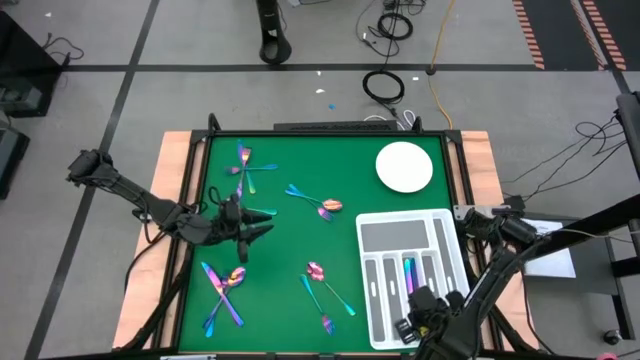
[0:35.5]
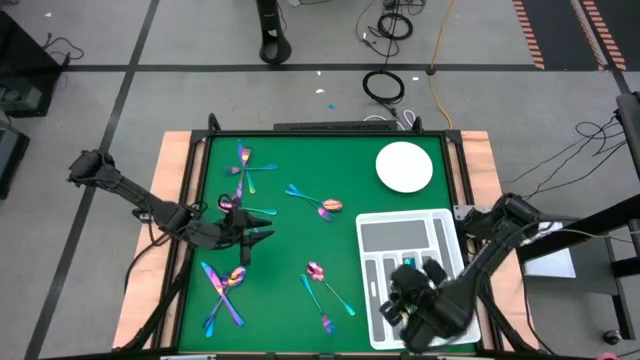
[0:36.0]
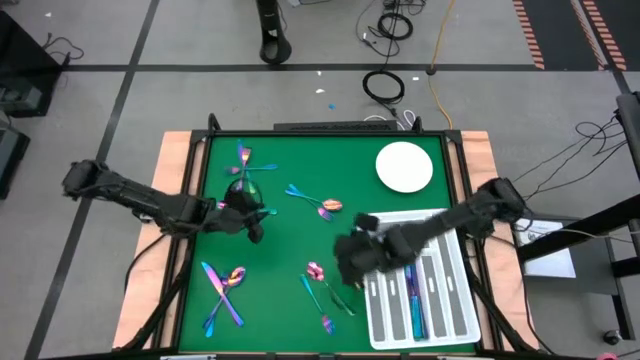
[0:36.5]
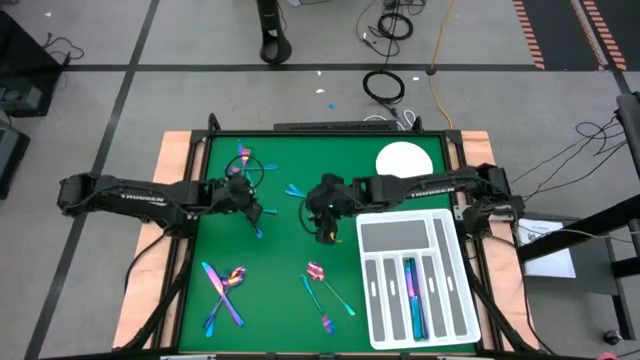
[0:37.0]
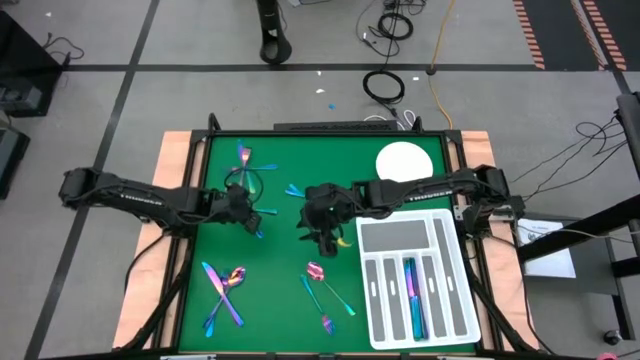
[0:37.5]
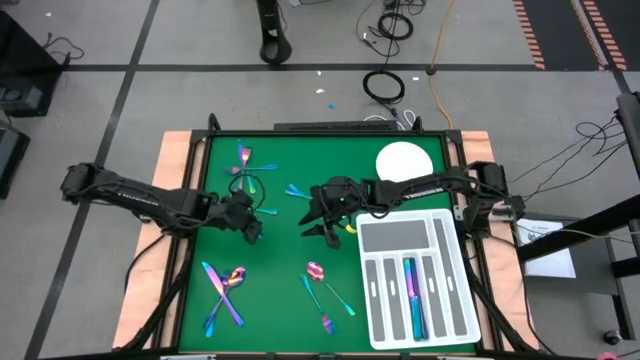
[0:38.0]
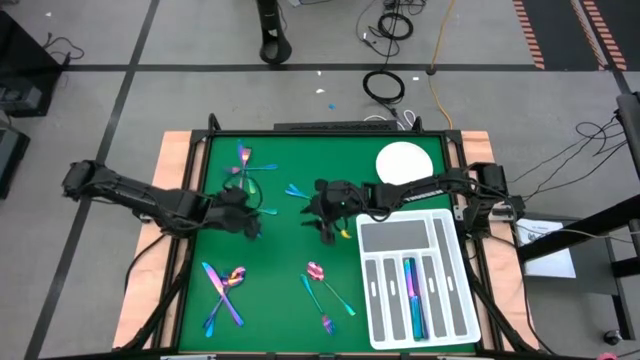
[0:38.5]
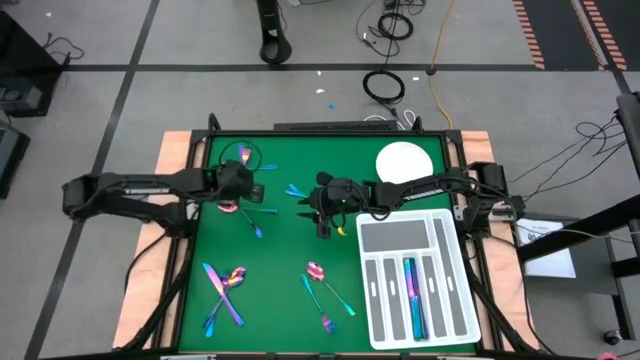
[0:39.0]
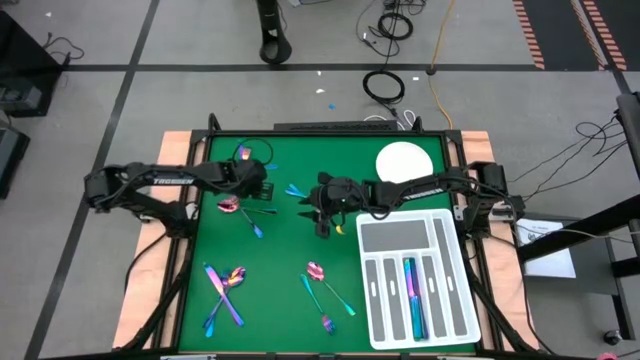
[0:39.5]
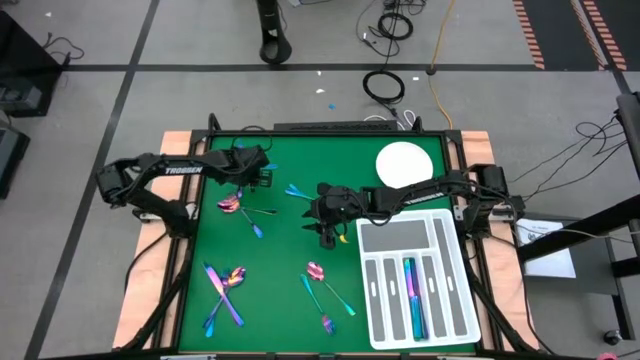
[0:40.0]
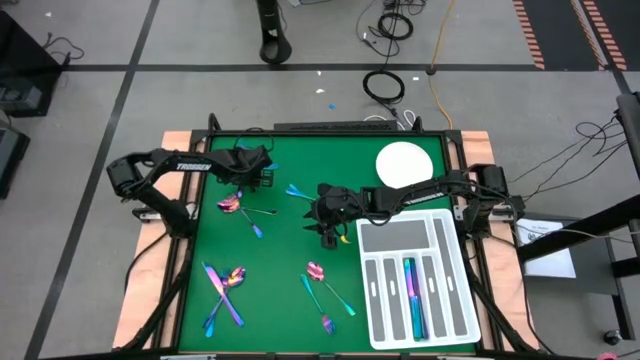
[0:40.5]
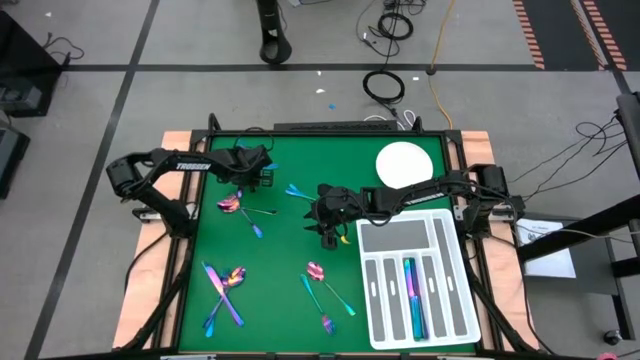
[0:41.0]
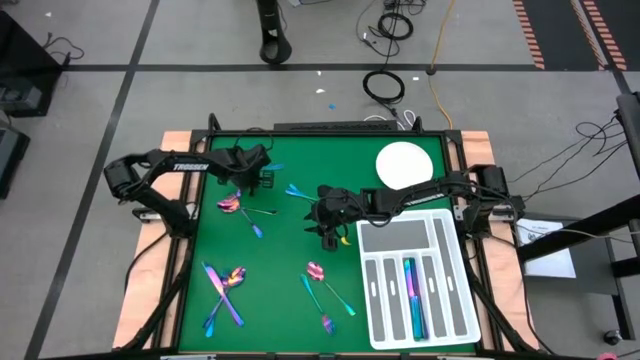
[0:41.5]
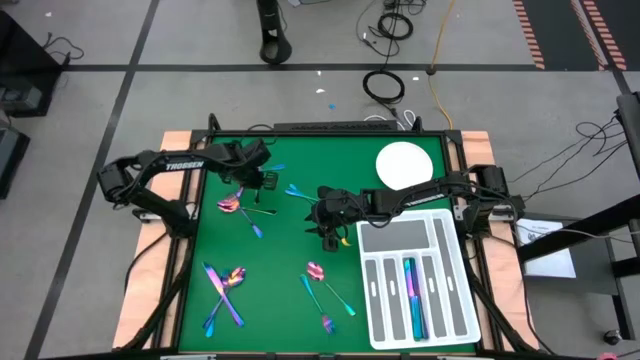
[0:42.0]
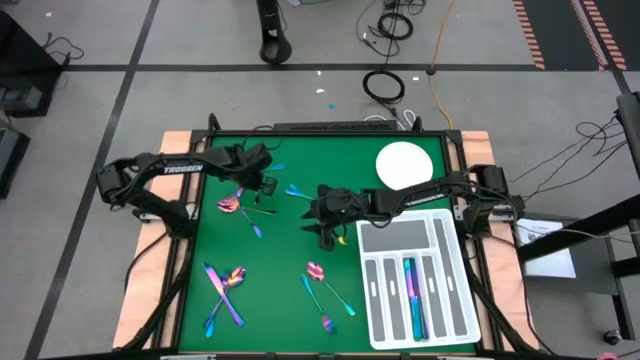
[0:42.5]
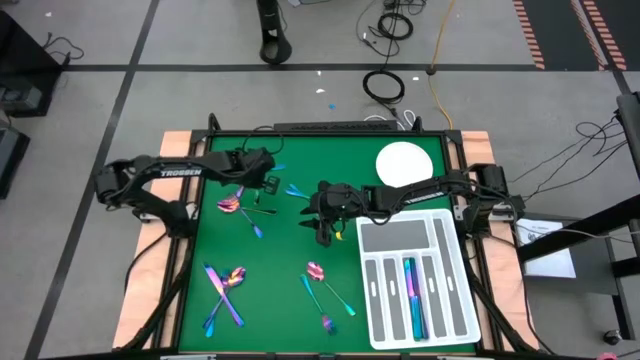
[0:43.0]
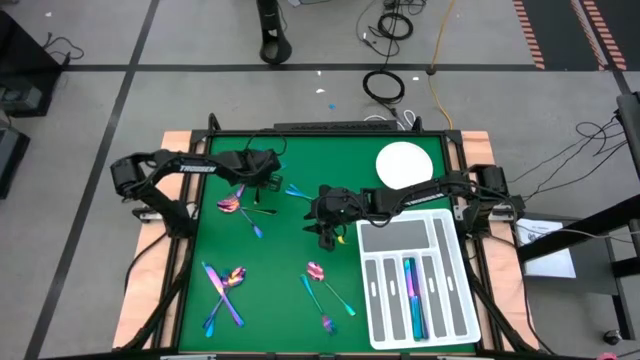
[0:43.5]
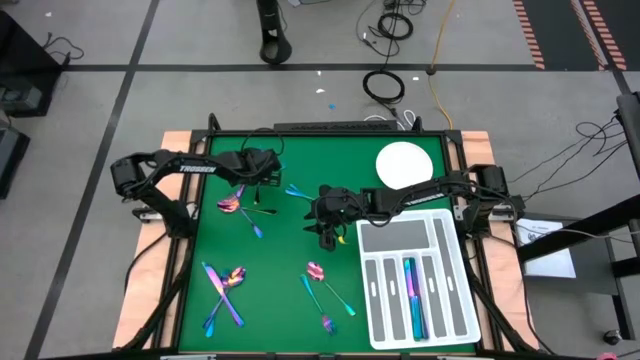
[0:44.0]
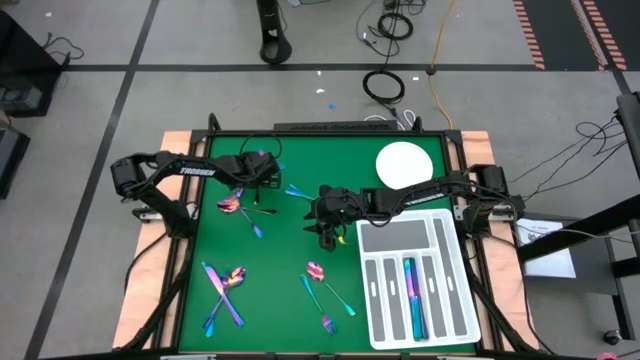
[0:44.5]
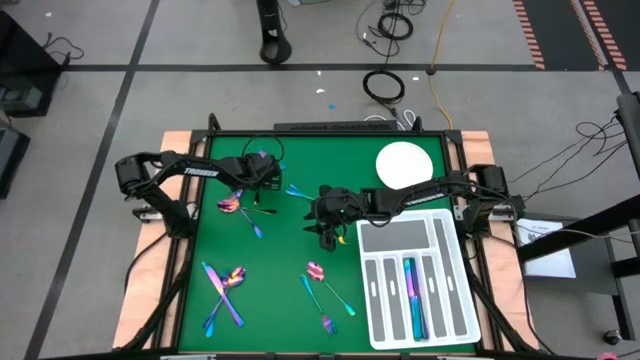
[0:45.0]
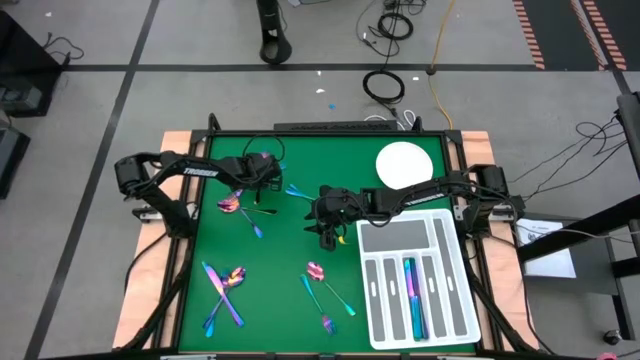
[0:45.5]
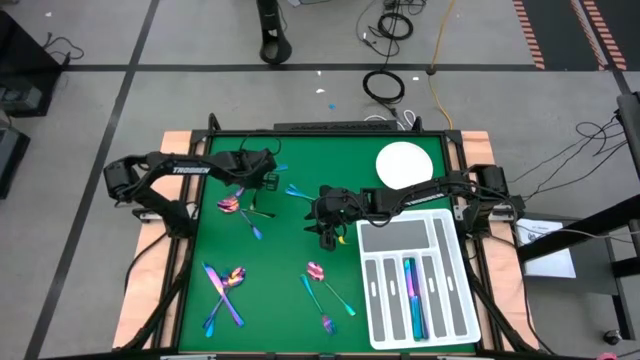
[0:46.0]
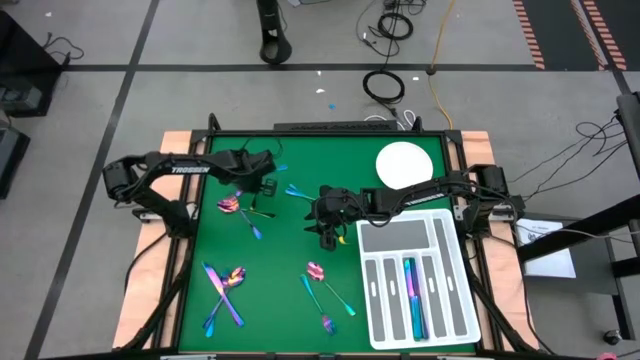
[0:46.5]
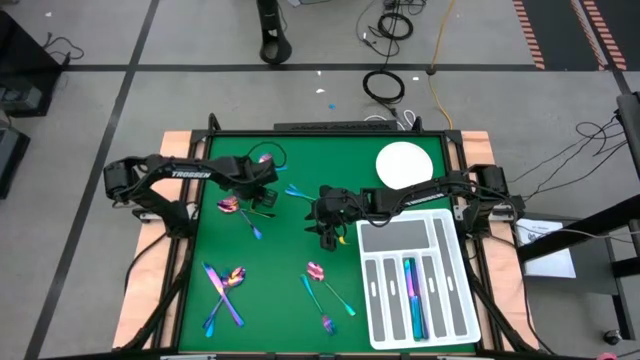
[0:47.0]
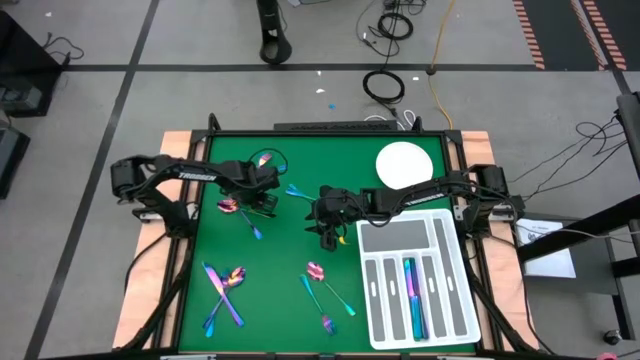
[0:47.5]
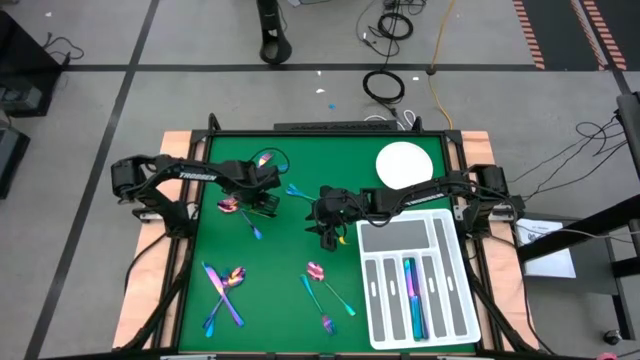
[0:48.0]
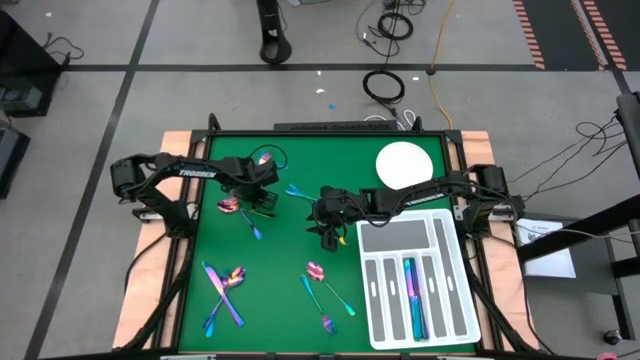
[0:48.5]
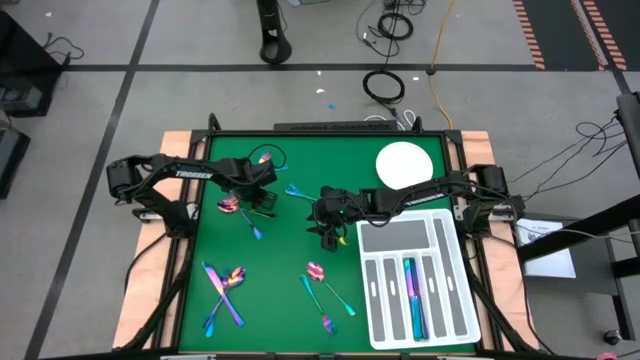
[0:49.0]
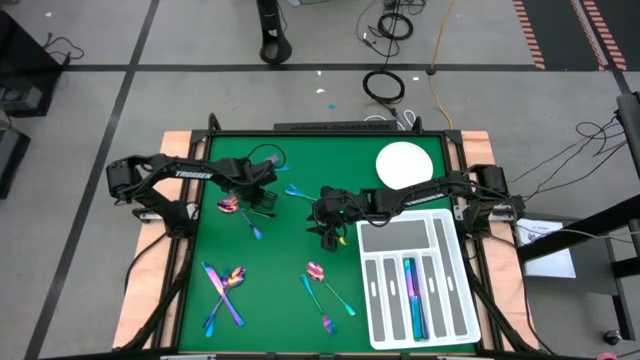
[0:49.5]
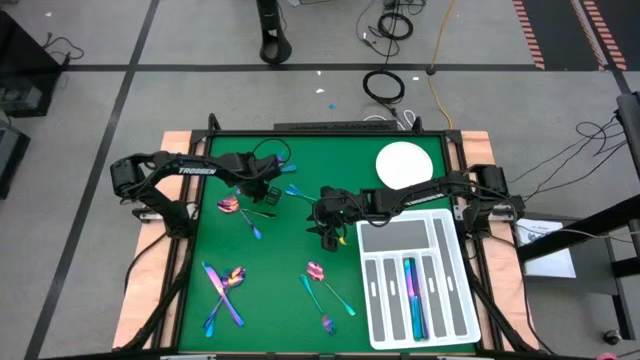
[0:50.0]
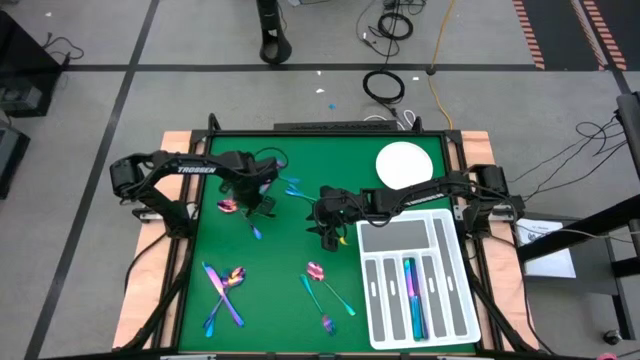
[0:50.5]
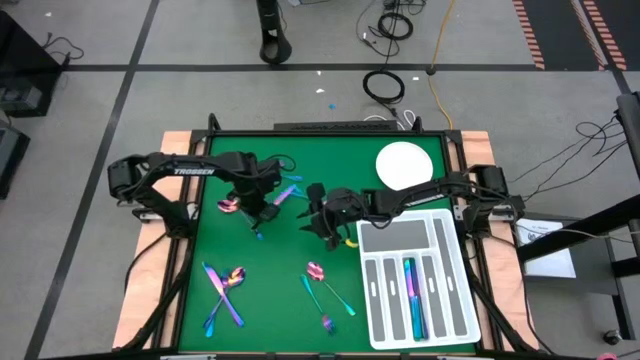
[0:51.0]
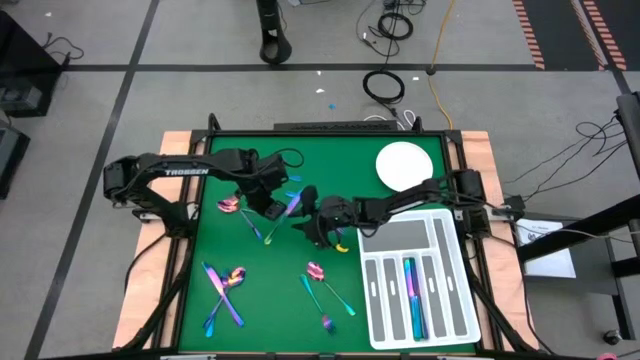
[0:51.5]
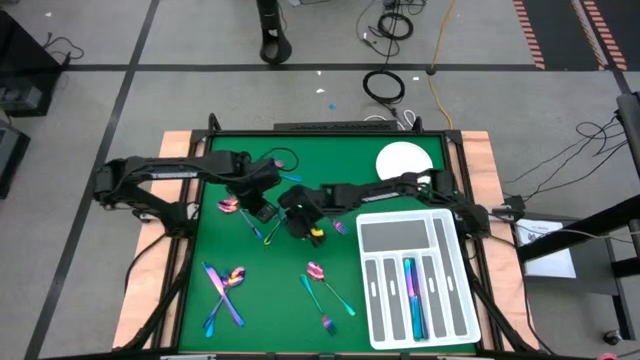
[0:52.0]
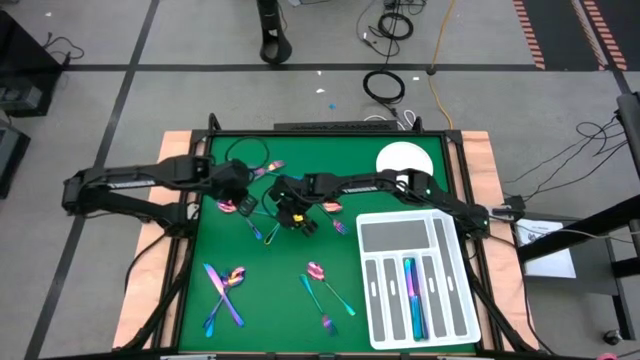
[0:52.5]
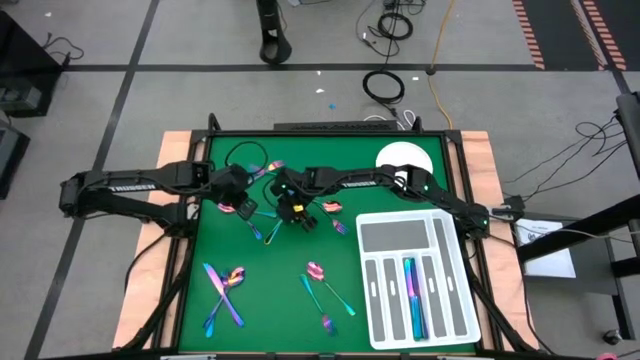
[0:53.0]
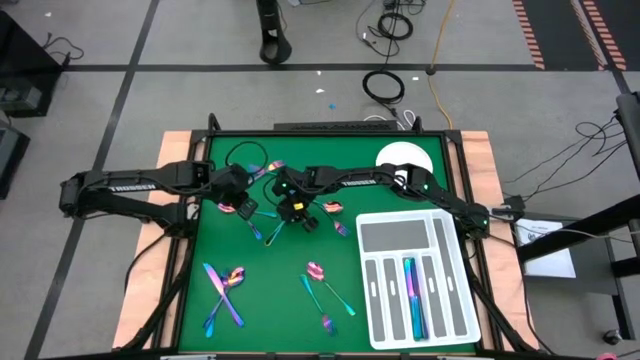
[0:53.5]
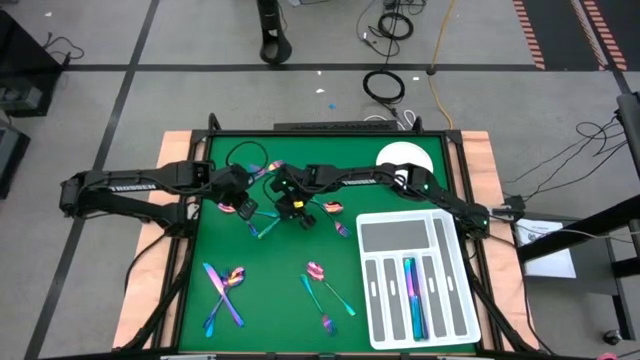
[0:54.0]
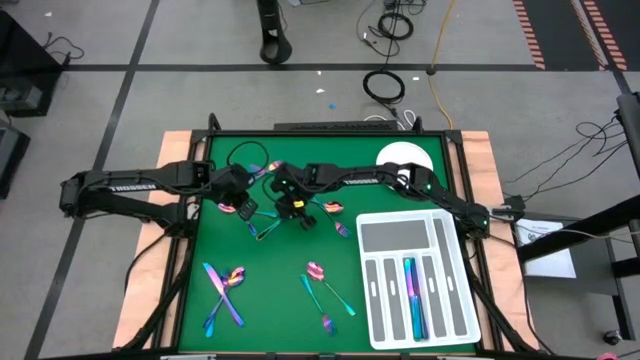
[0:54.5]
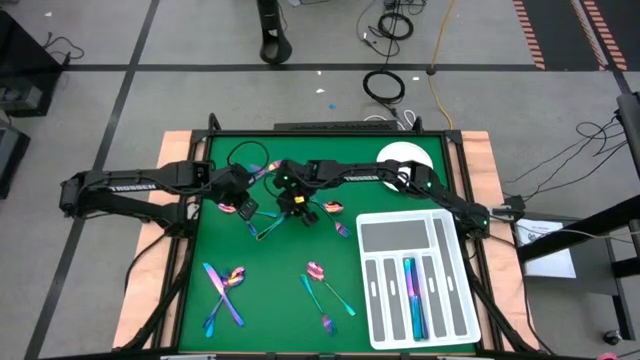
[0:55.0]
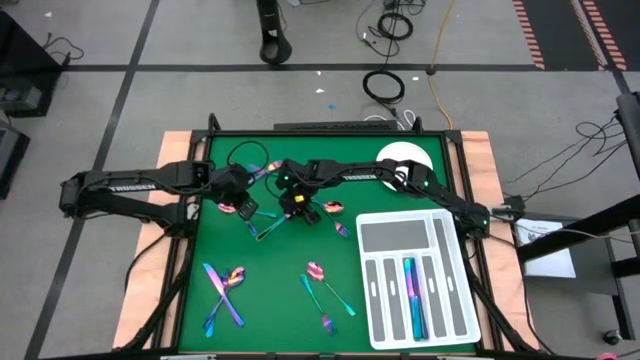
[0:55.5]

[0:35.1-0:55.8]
Task: Sort silverware
Put the top left knife into the utensil organizer
